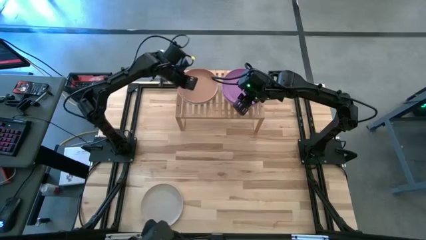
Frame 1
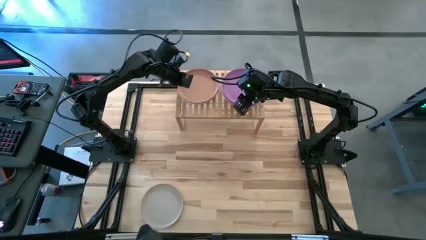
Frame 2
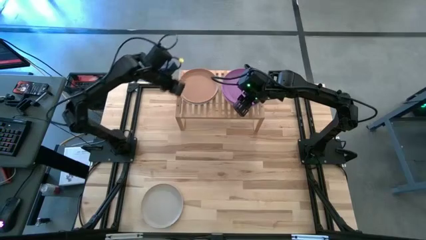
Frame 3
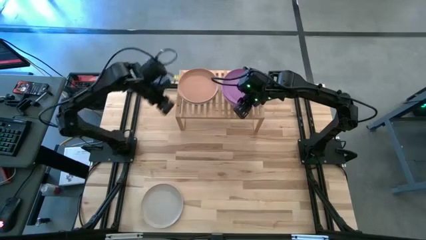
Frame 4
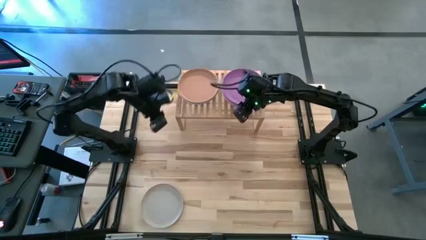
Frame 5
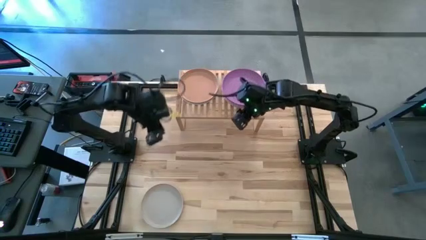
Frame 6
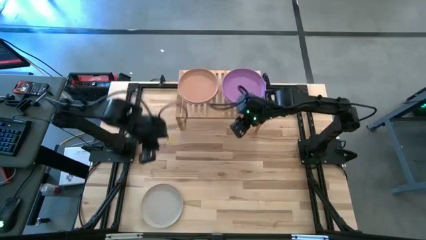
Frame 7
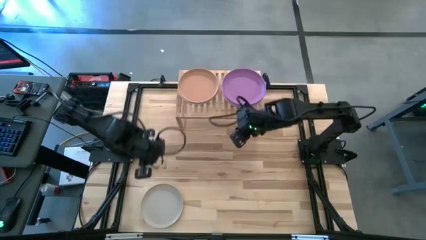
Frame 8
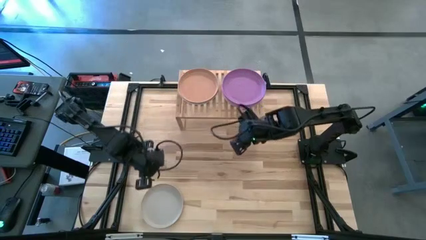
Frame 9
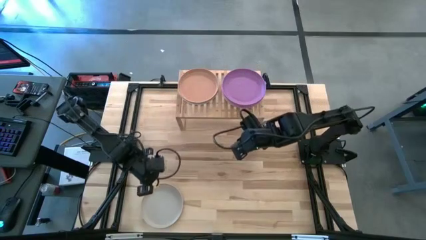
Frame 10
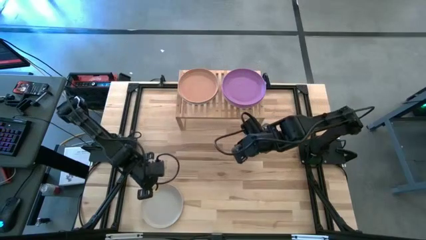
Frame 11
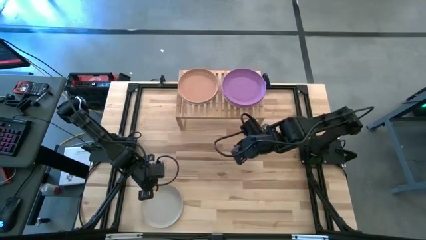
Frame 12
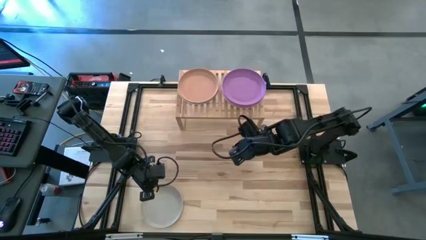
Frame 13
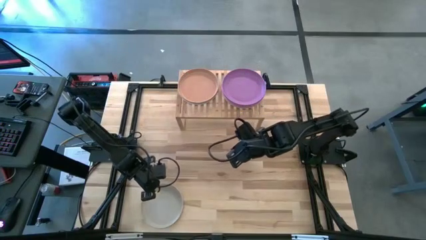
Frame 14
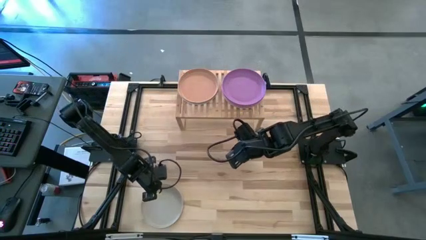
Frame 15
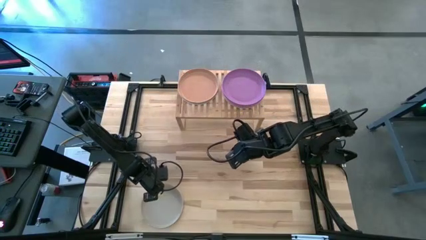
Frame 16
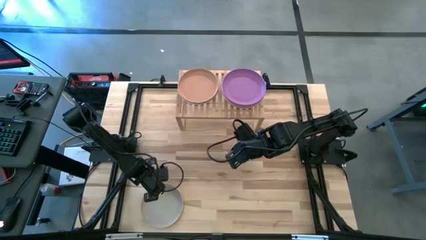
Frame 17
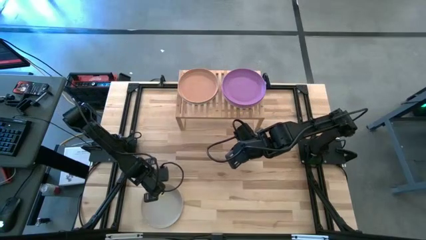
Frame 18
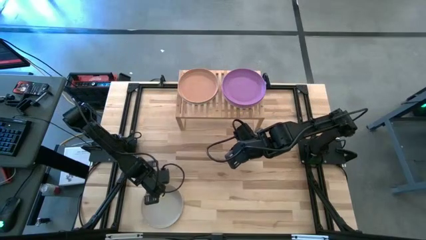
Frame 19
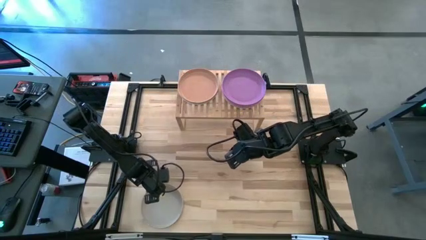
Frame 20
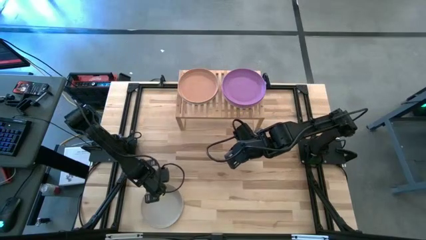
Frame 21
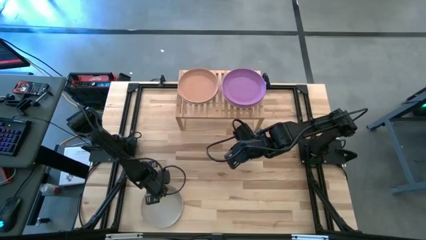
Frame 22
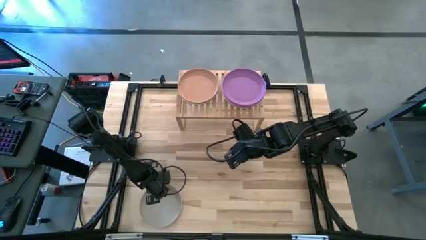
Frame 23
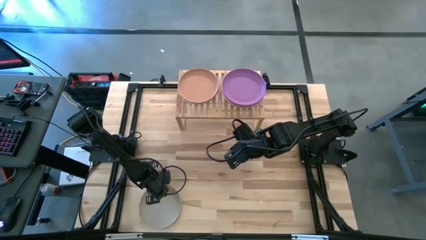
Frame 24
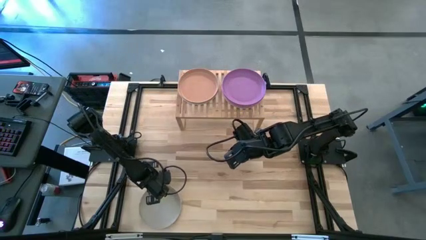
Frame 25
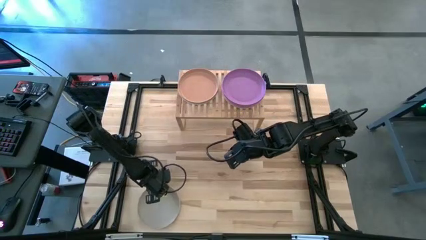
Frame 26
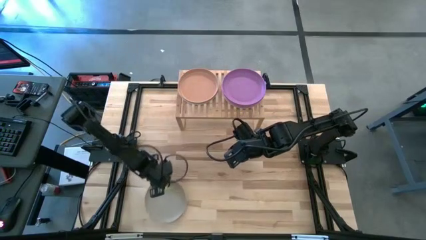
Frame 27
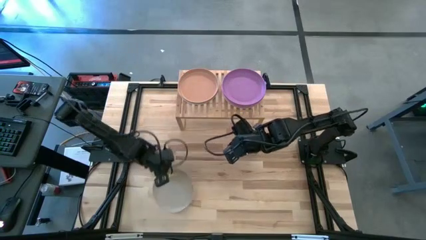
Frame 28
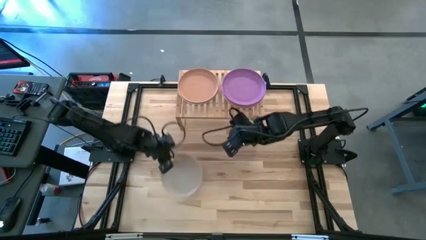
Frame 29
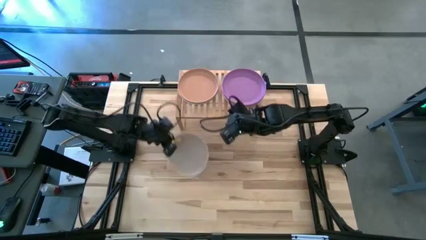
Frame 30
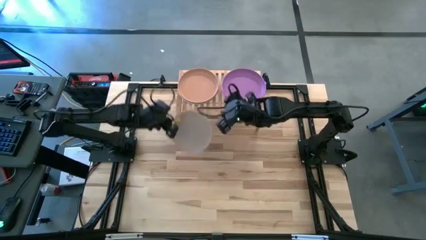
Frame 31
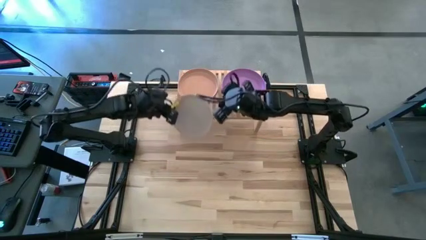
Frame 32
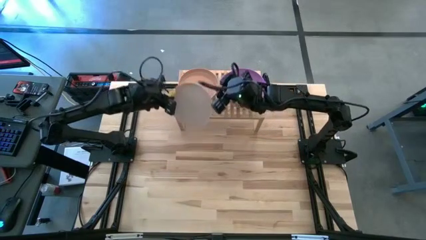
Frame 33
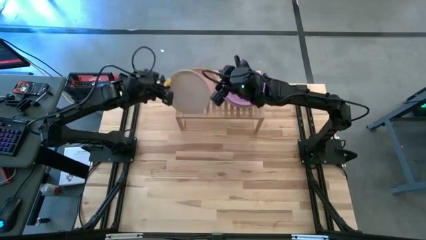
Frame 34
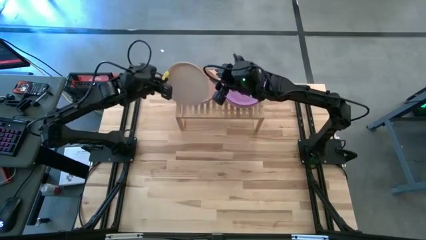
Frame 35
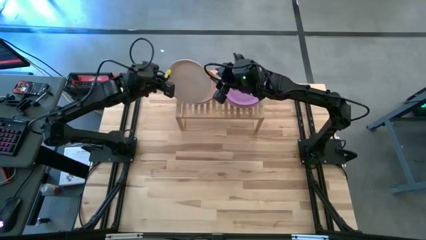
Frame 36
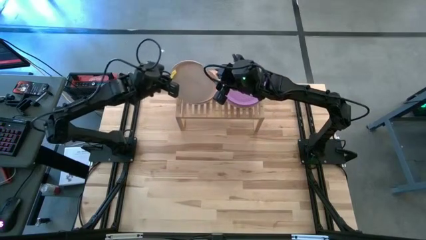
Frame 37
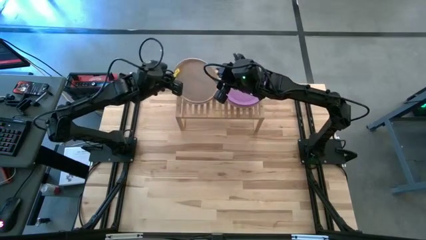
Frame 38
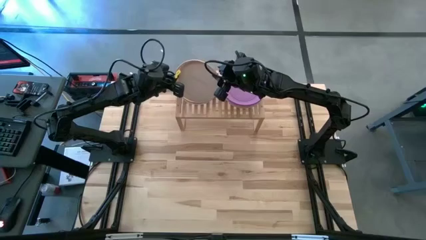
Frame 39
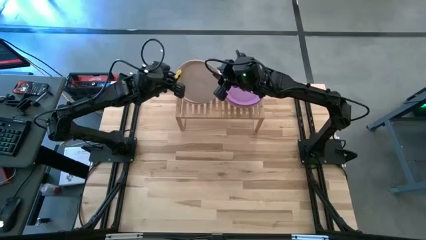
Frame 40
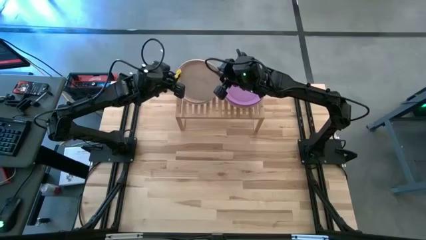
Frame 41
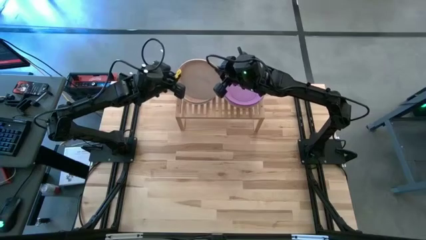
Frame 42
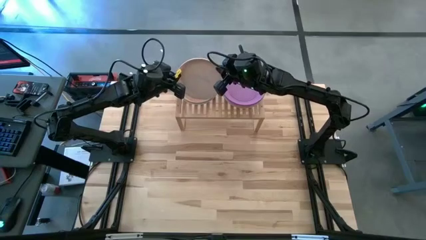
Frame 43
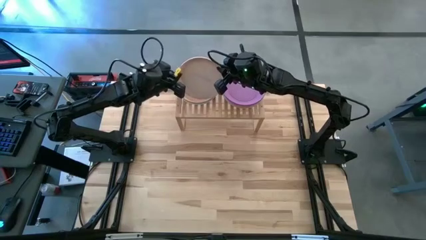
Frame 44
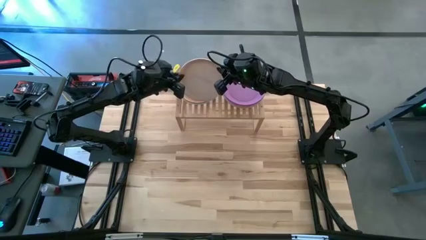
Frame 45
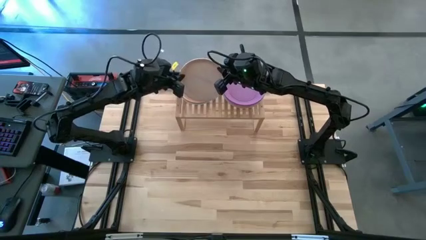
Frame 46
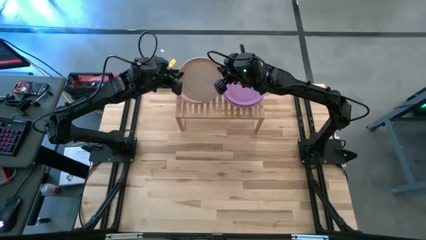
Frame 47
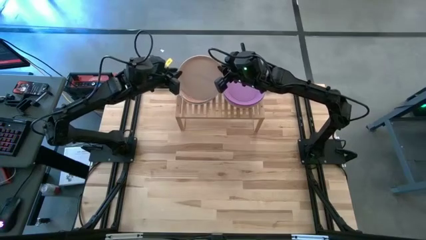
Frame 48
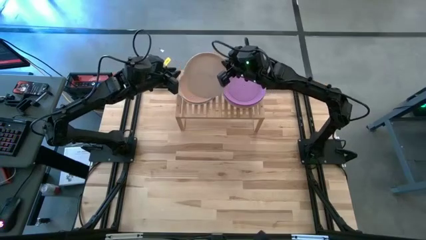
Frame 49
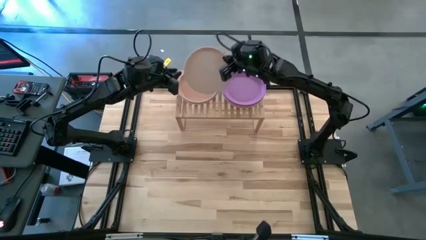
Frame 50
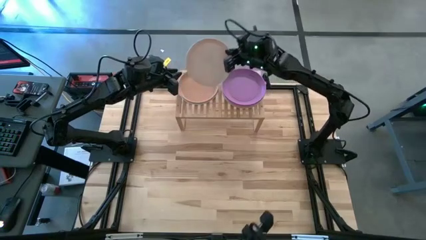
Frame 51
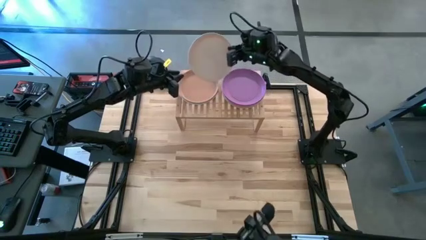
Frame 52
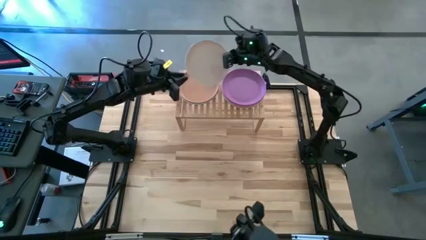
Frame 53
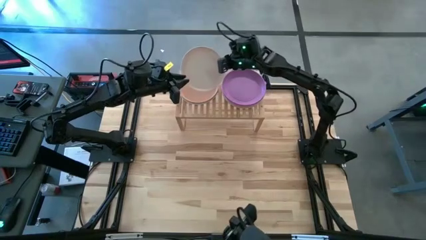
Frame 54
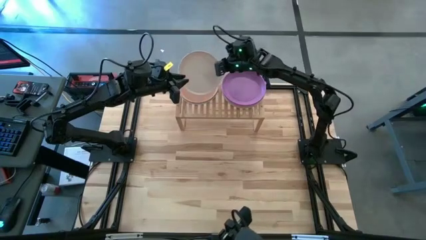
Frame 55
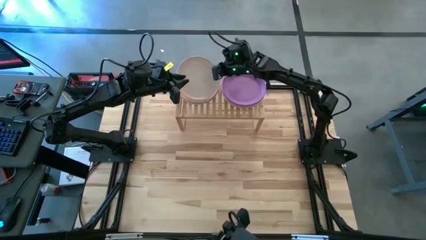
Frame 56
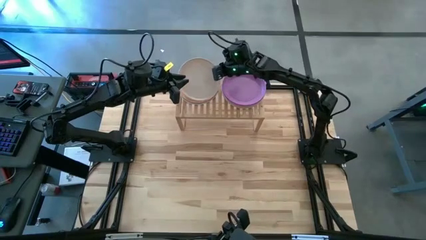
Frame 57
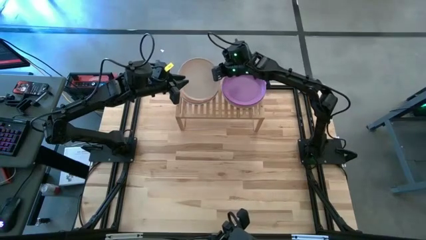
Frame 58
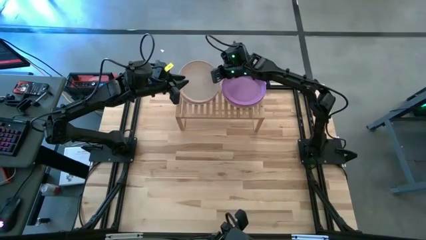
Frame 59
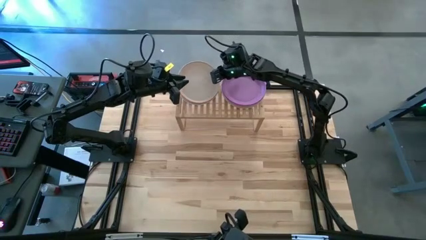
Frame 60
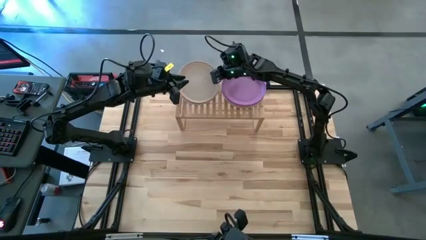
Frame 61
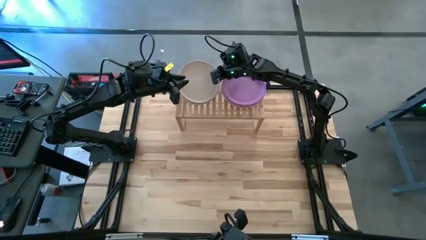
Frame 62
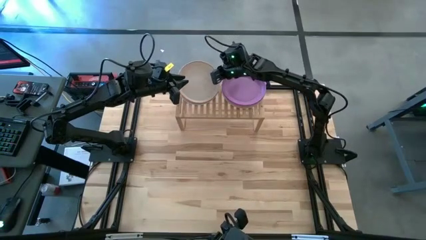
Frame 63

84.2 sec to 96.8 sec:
Task: Place and stack plates onto a shelf
Stack the white plate on the brown plate on the shelf
